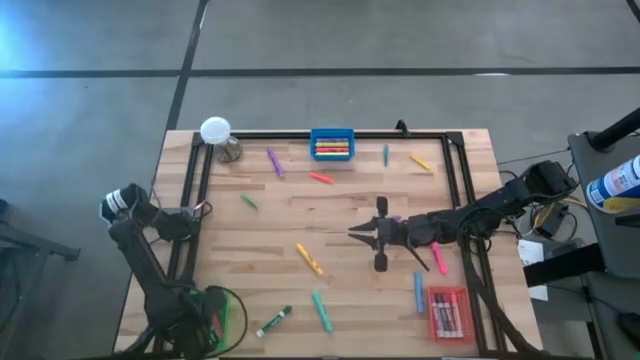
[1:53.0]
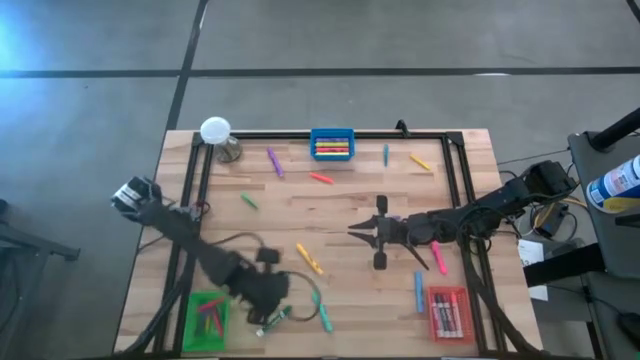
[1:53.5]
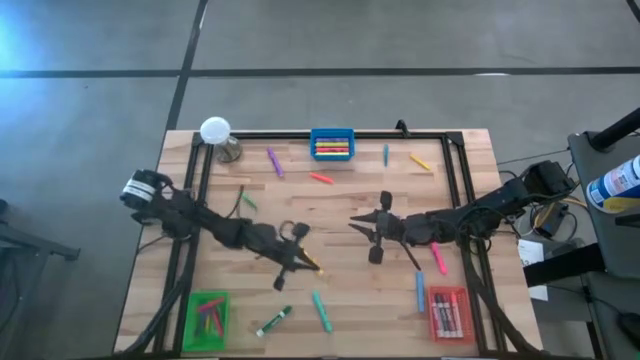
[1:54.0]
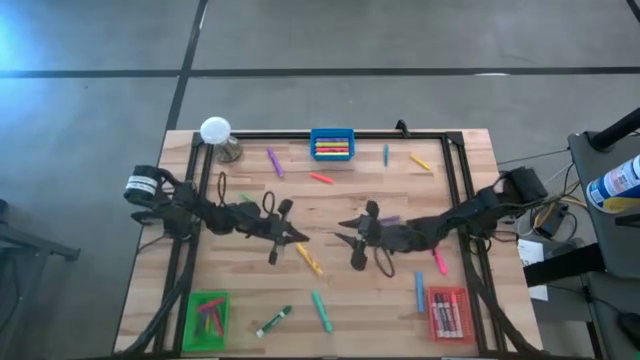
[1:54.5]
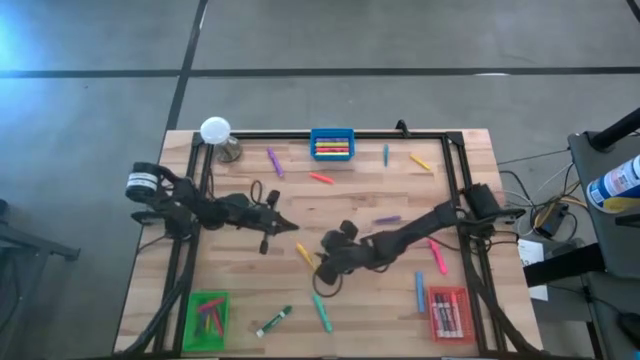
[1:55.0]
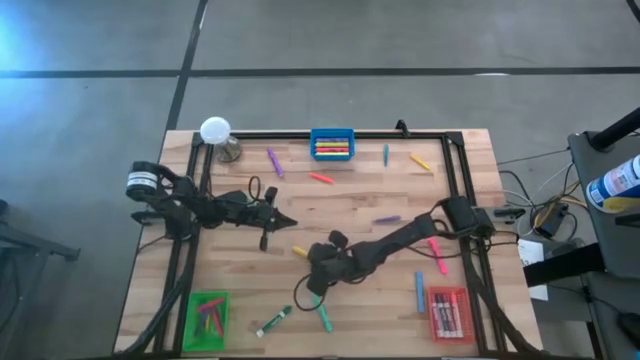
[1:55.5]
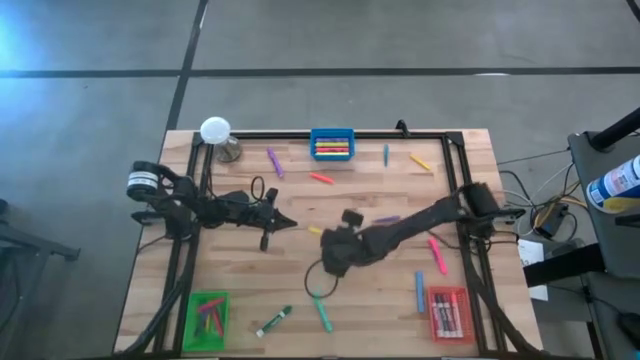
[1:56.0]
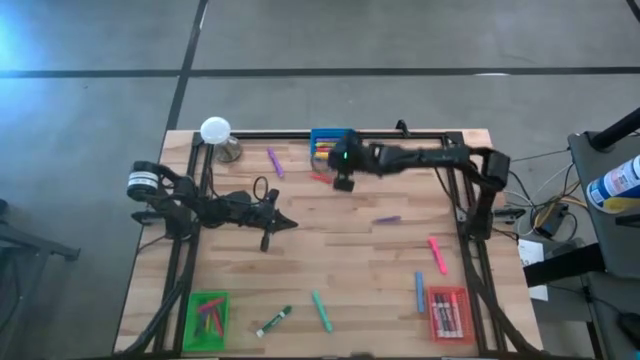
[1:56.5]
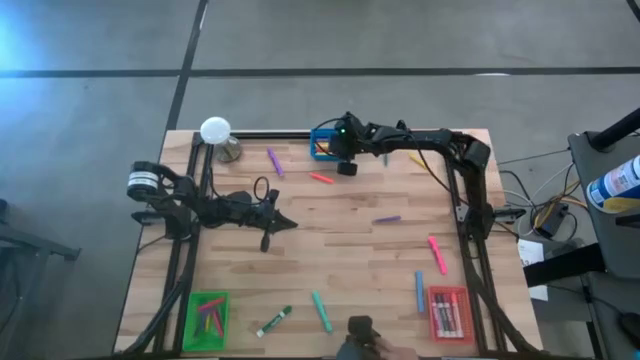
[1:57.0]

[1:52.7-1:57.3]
Task: Pick & Place Markers
Put the yellow highlighter into the blue bin

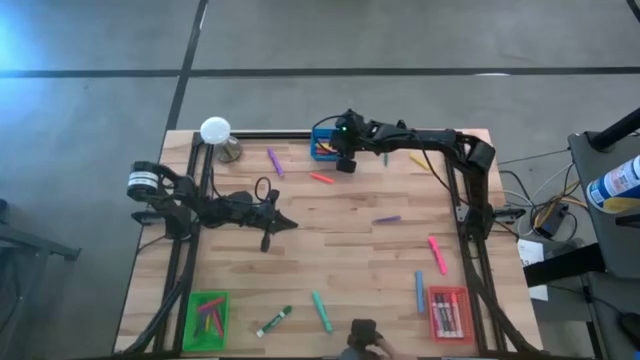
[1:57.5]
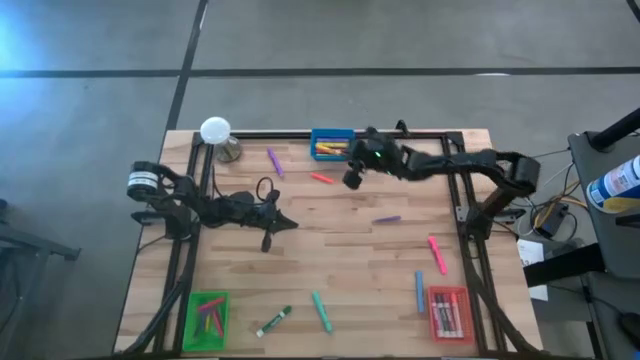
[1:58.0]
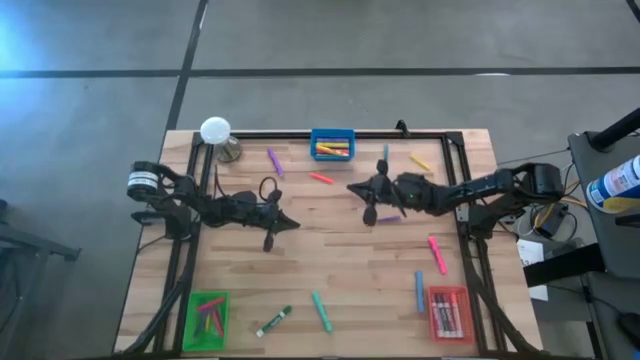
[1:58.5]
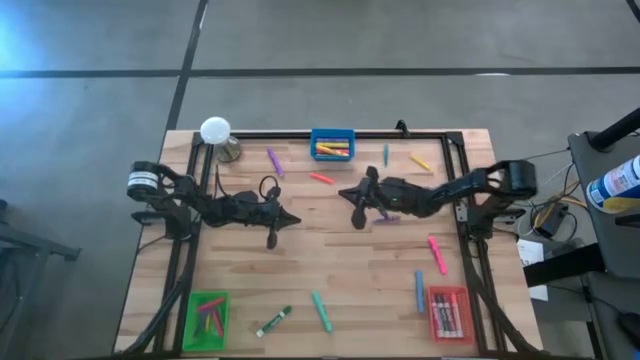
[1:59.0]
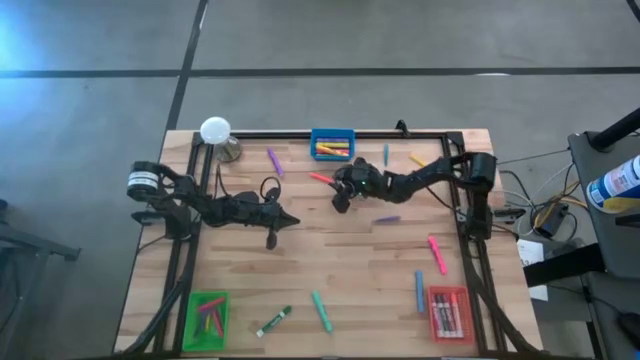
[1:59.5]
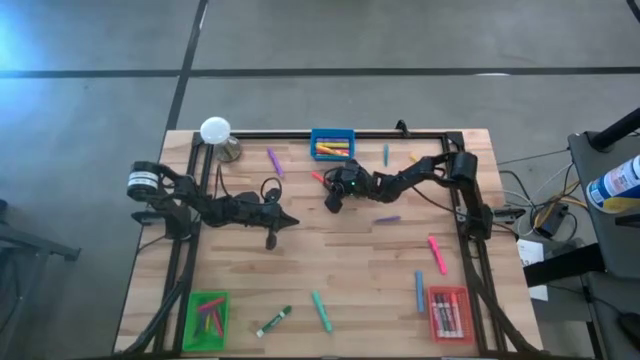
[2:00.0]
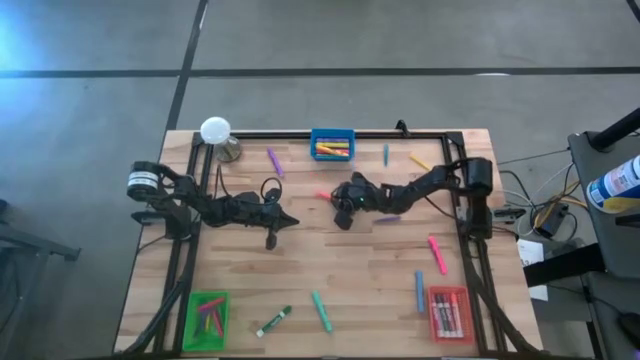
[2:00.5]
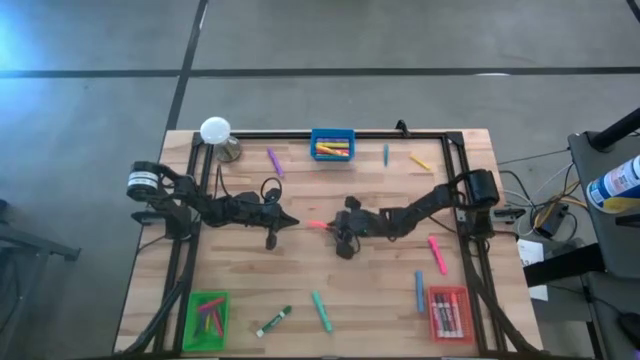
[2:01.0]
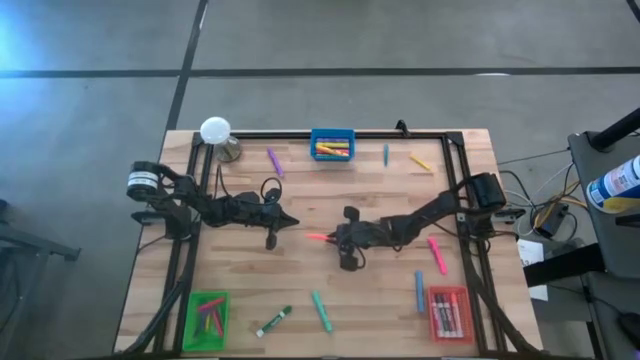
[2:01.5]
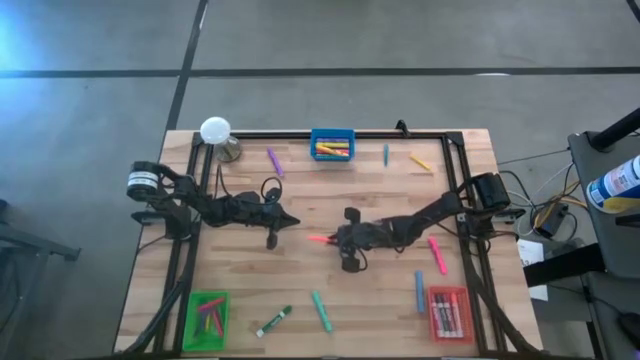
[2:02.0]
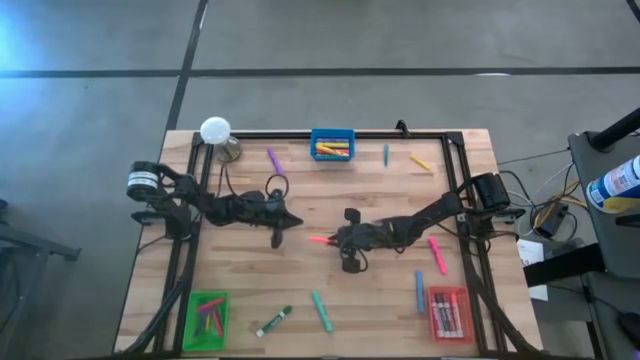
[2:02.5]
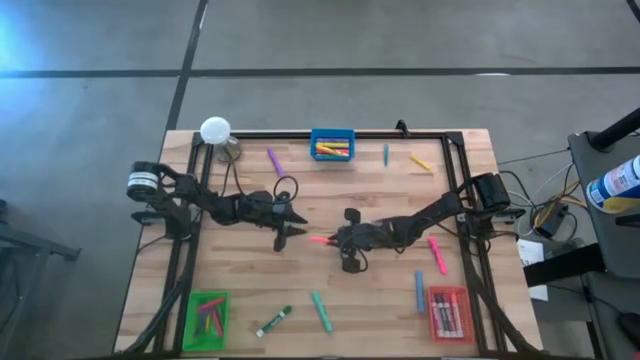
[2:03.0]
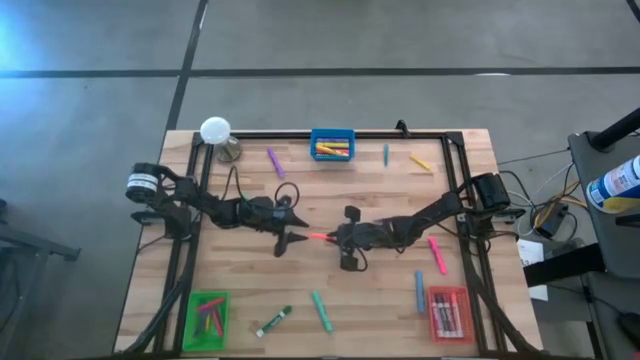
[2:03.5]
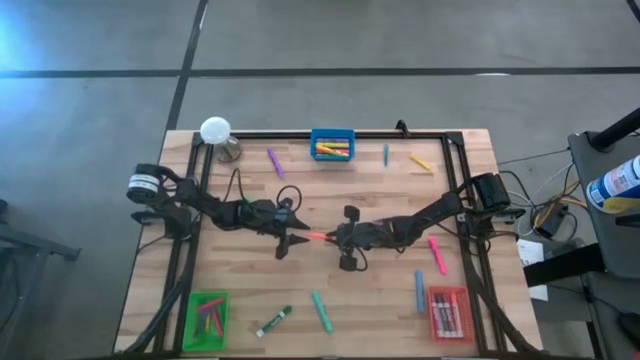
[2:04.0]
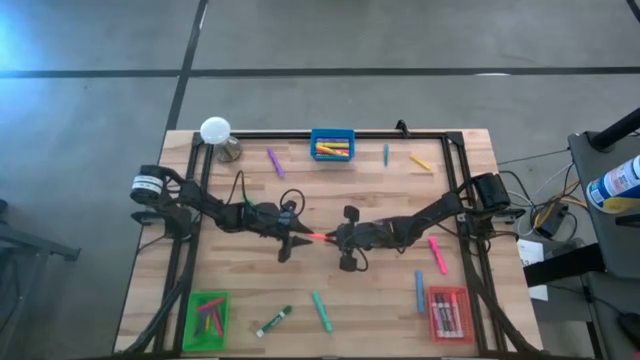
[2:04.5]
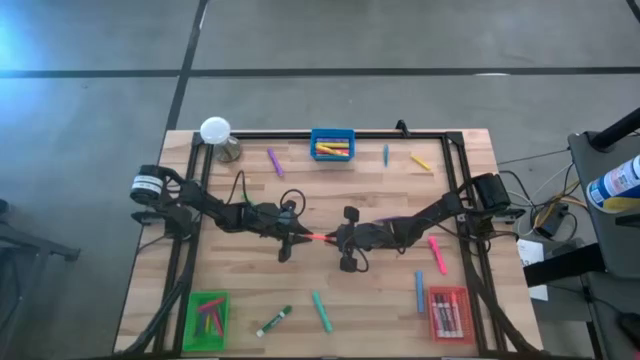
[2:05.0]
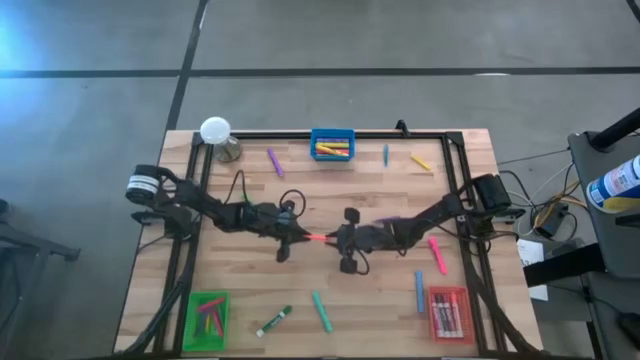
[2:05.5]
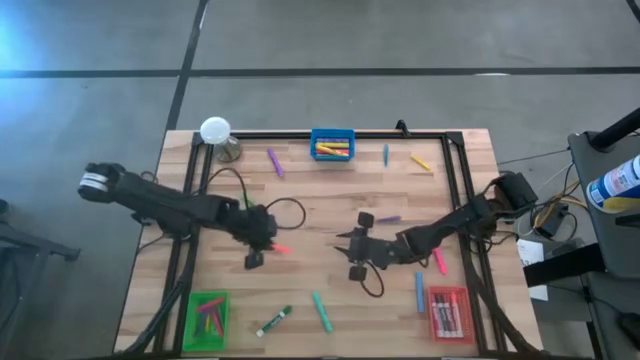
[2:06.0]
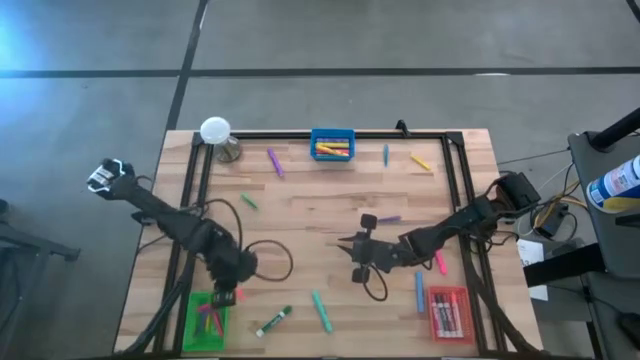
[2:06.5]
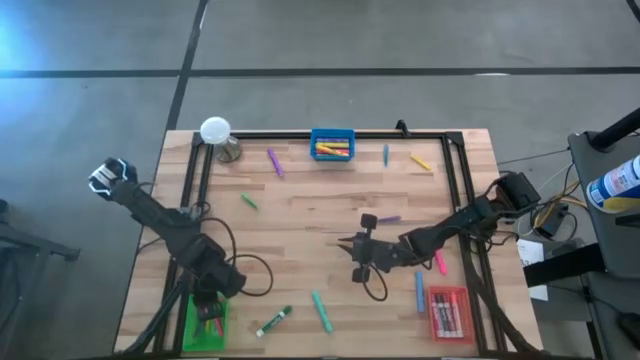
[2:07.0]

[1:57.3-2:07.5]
Put the orange pen into the green bin

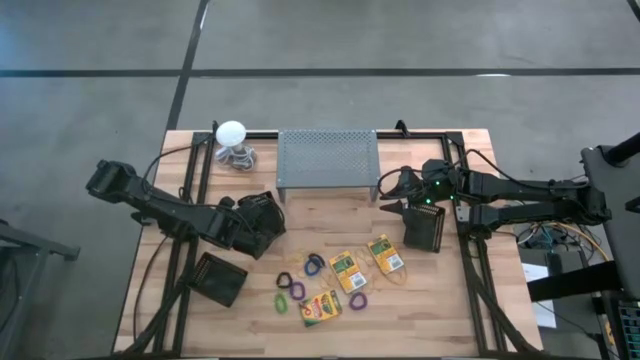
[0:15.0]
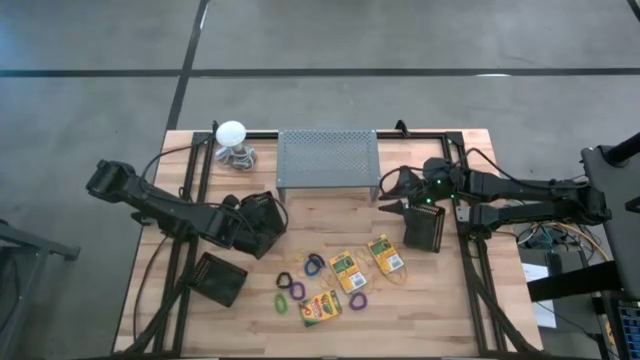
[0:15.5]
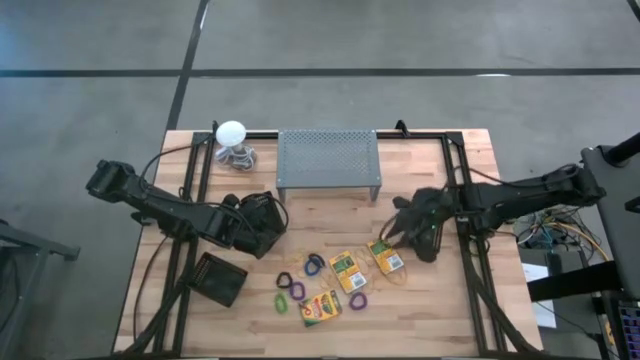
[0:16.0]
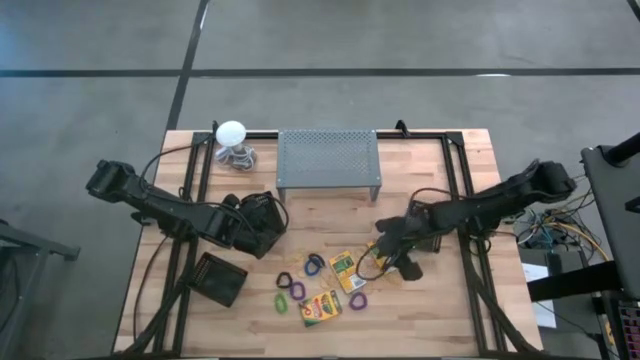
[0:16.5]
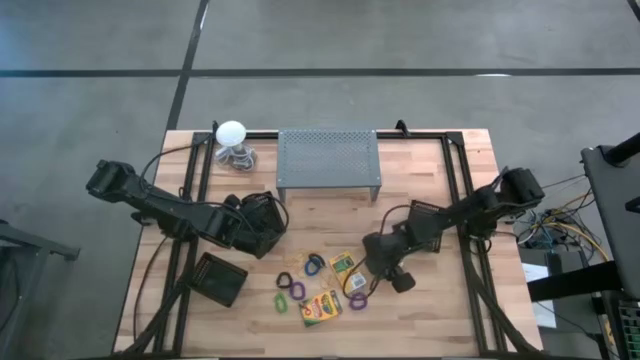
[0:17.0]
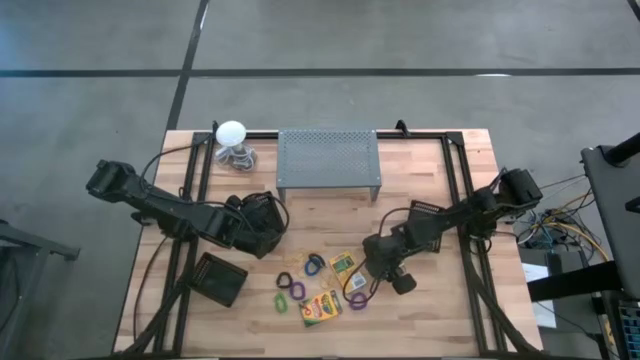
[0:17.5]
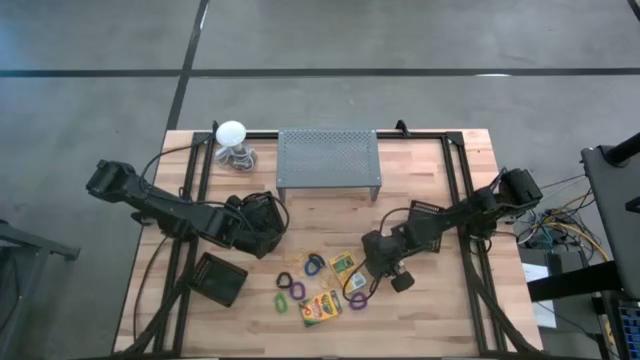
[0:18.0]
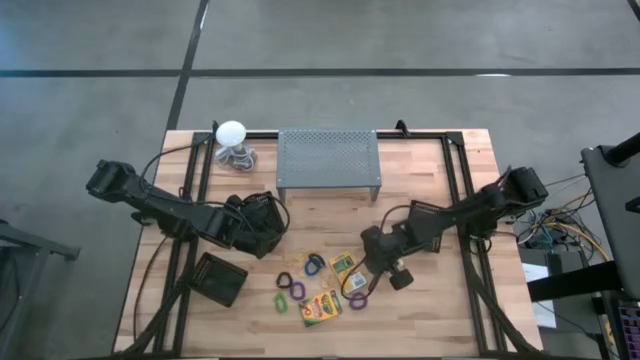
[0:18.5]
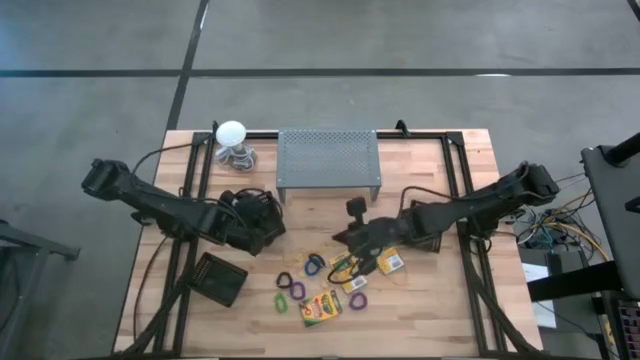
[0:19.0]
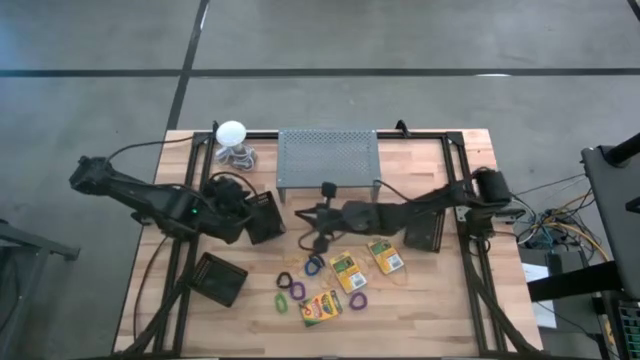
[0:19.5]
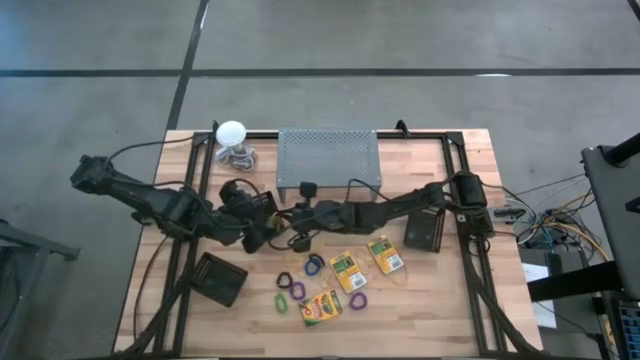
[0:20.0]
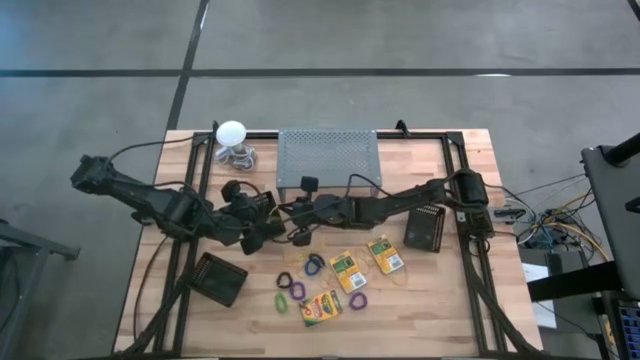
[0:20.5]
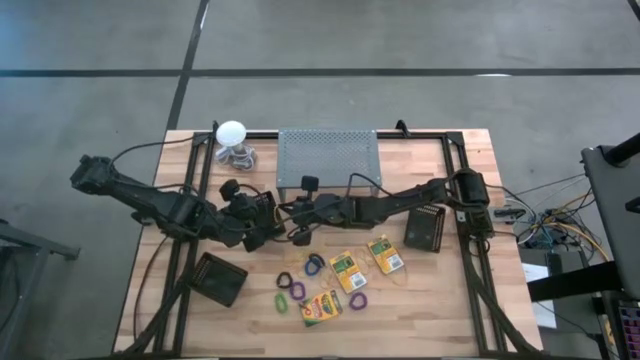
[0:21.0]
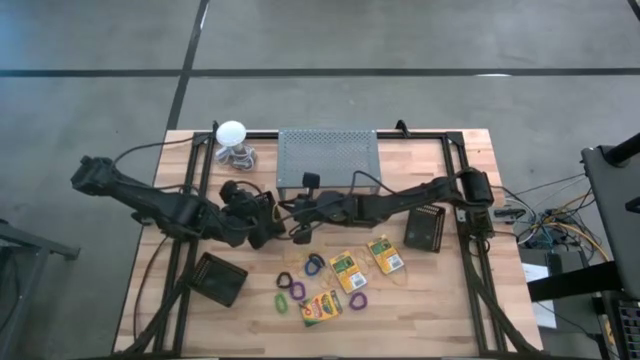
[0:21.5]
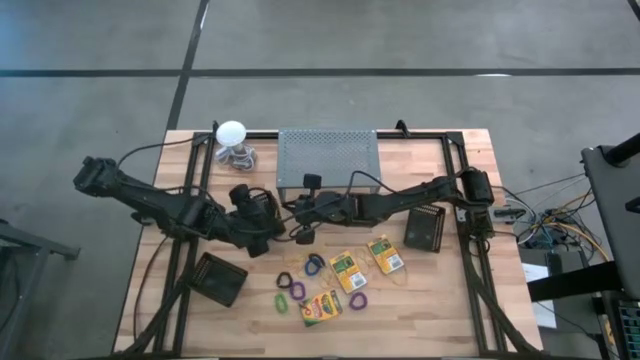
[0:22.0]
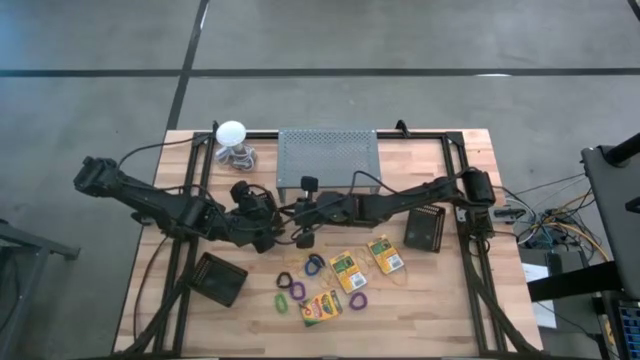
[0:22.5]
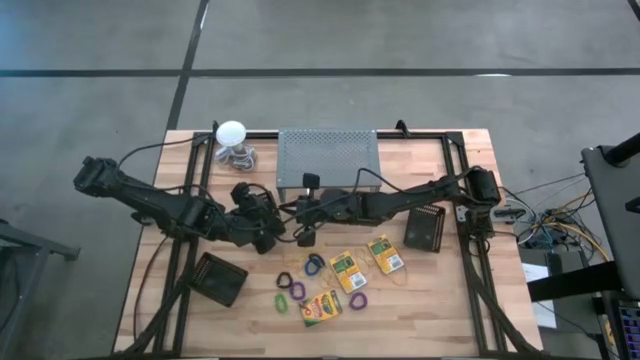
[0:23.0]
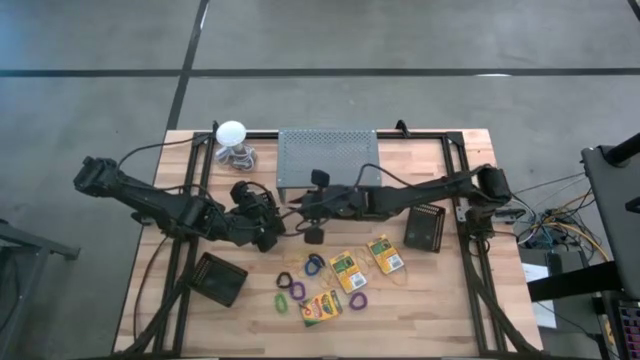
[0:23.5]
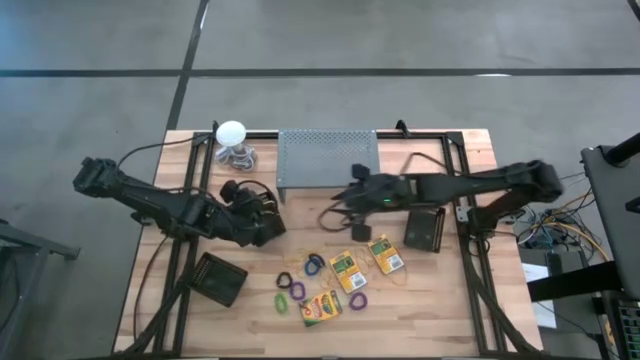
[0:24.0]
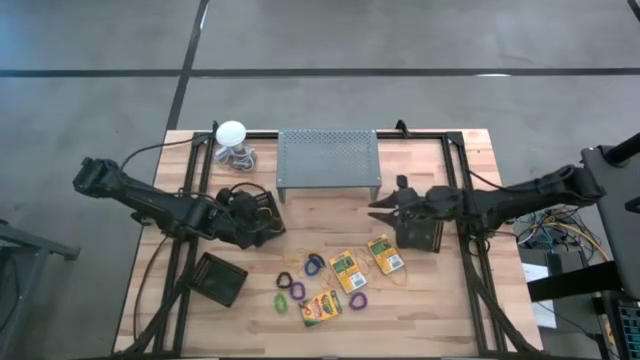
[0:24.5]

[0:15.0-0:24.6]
Task: Pick & Place Office Desk Supplies
Put the yellow rubber band into the top left black bin
